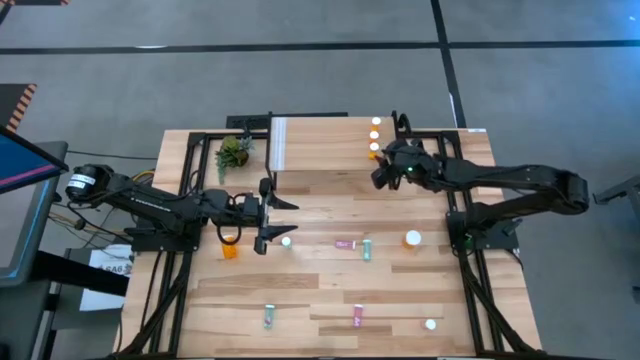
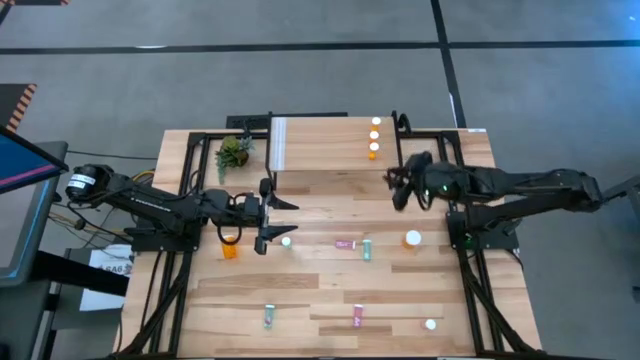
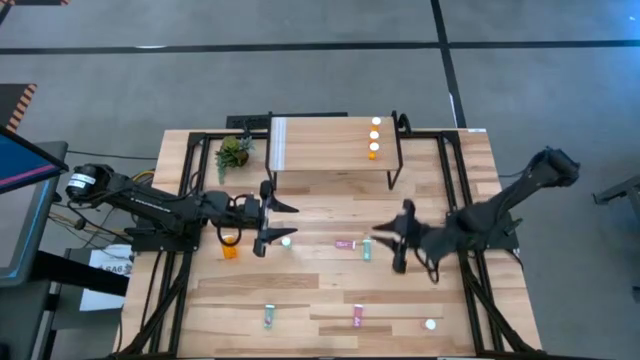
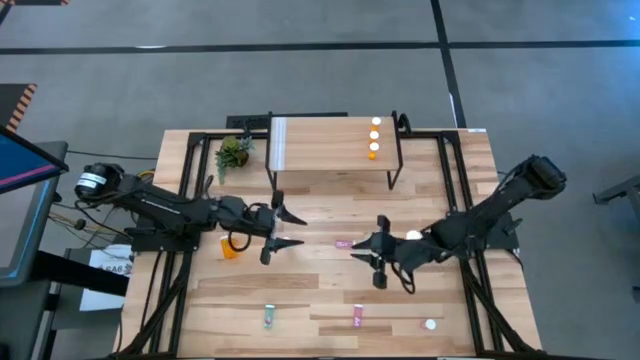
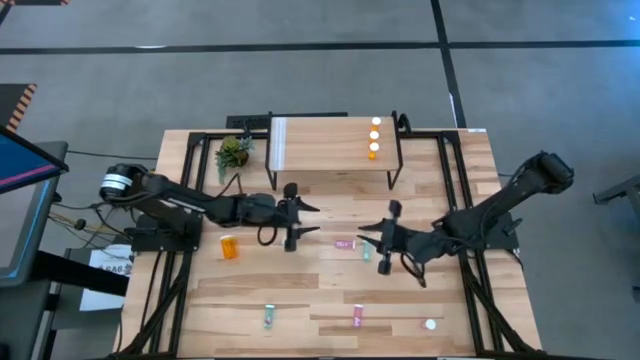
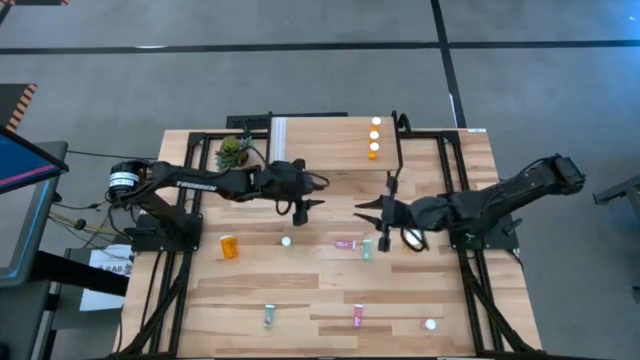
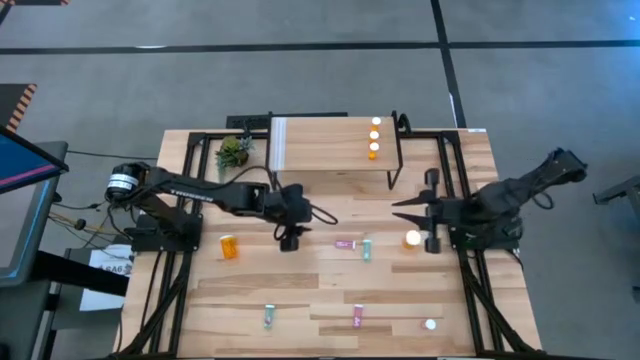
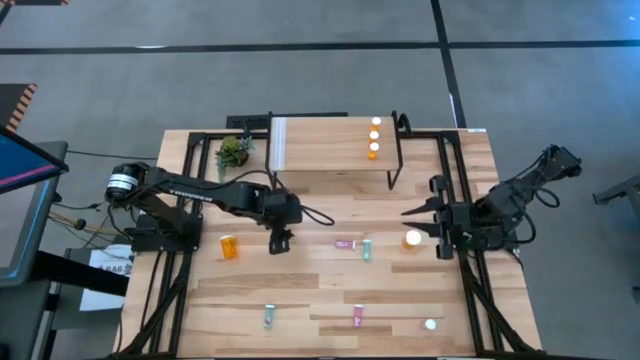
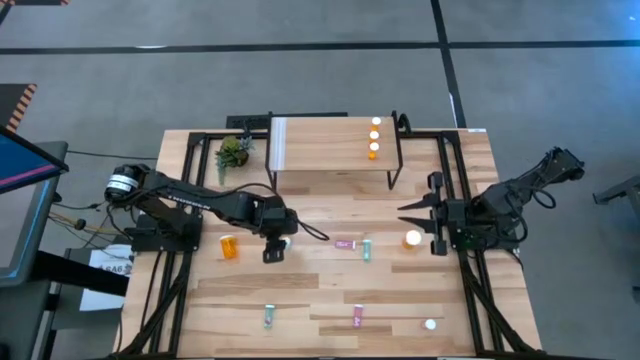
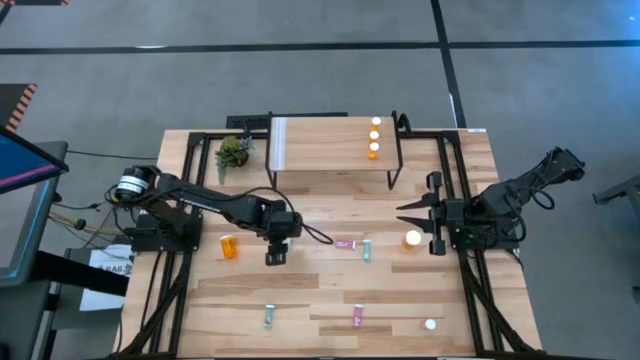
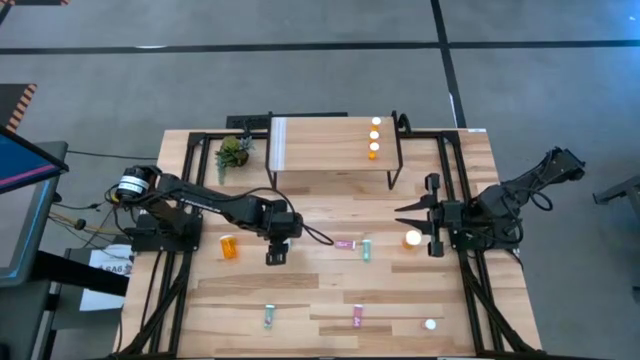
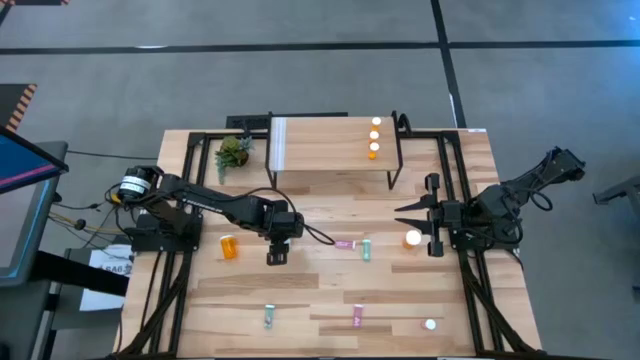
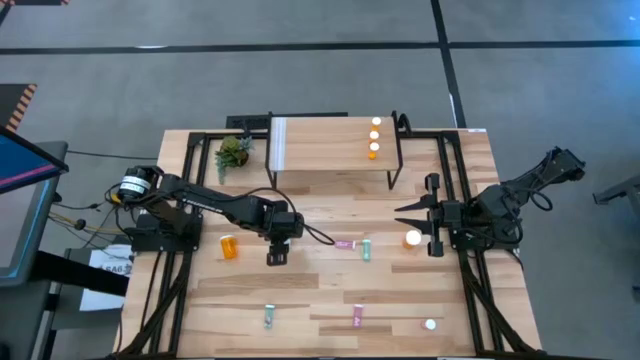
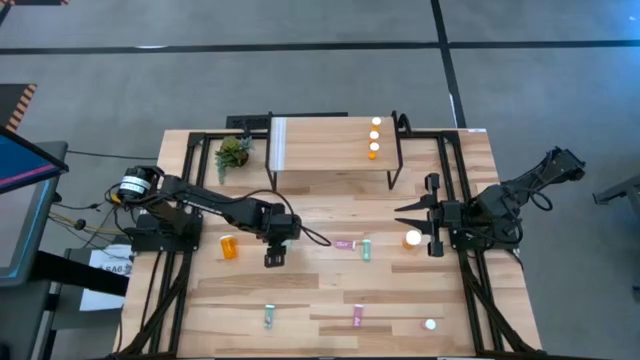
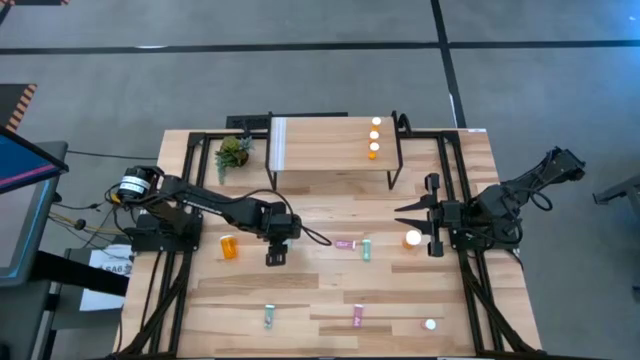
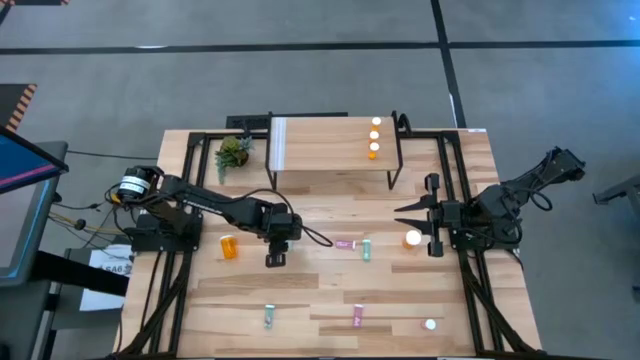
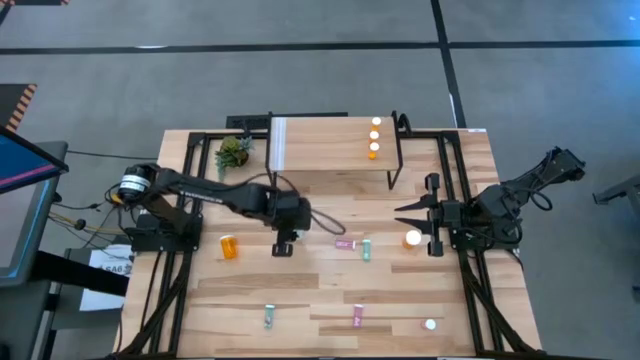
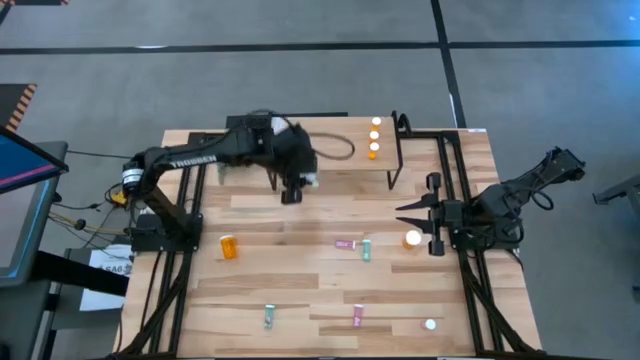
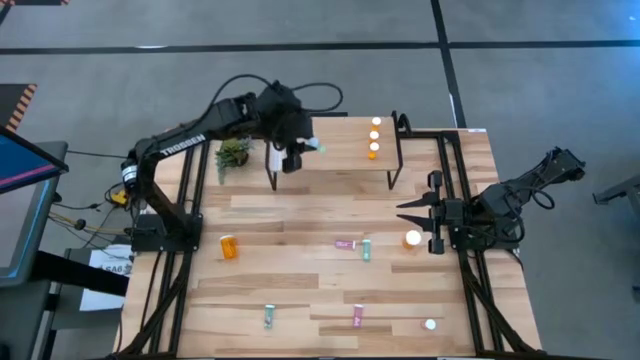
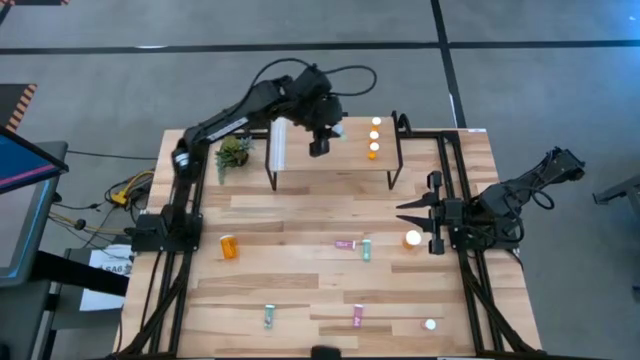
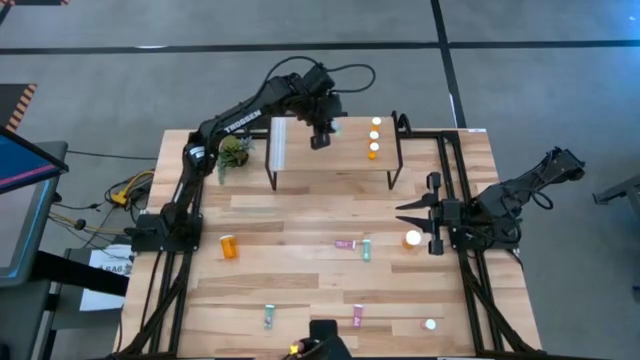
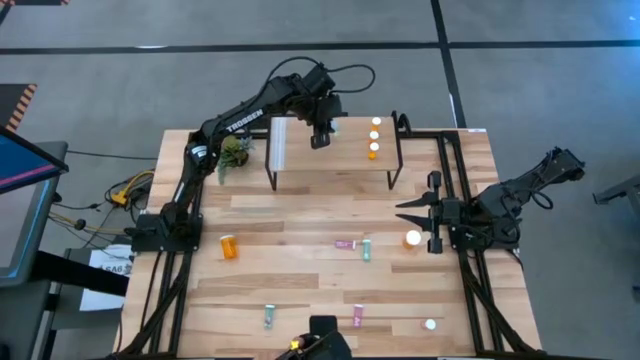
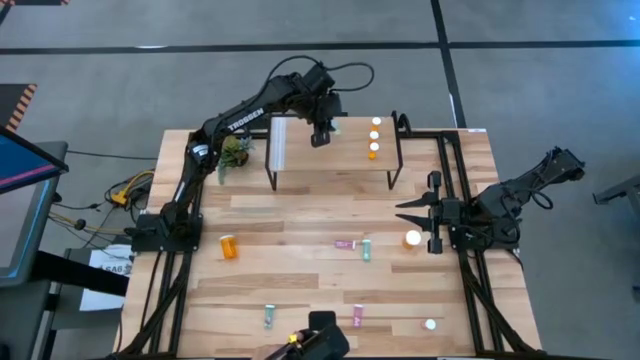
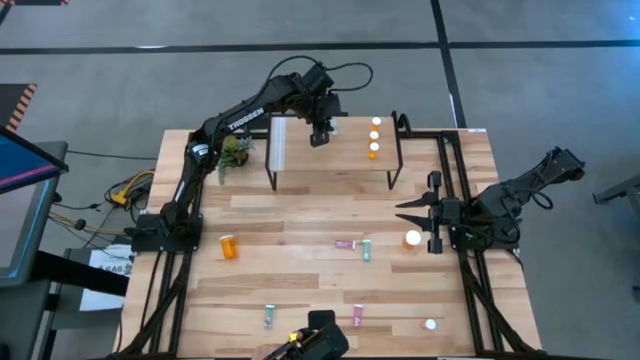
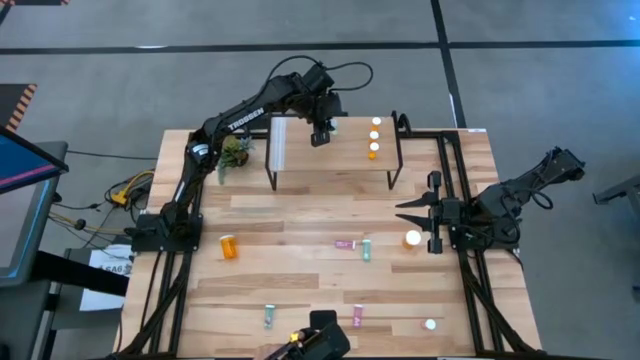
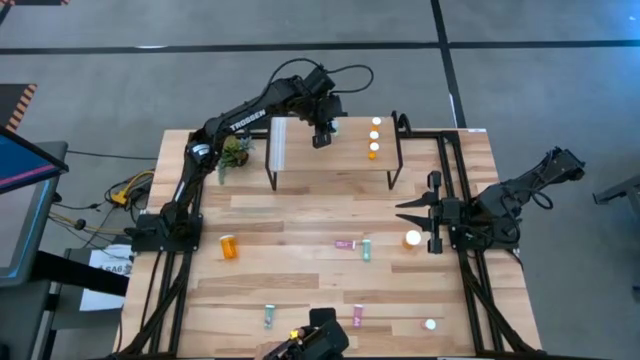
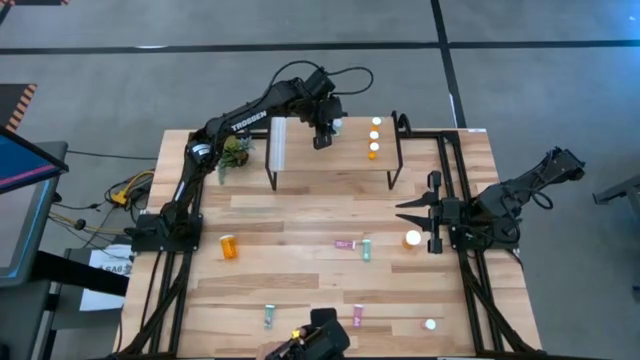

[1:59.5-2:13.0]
Task: Pick and place medicine bottles onto shelf by color
Put the top left blue pill bottle on the shelf

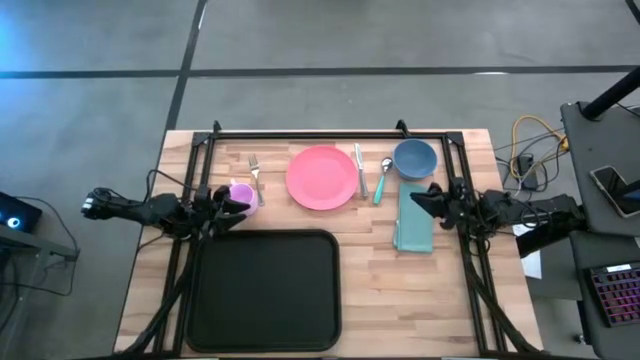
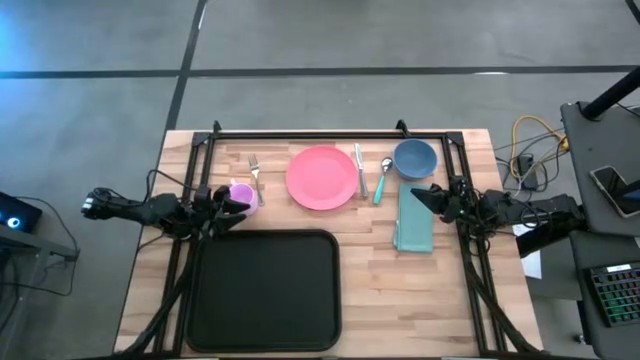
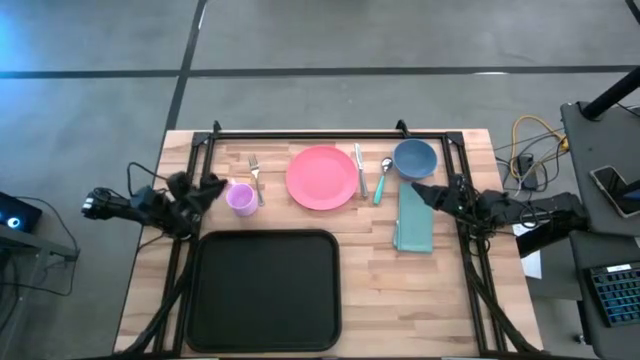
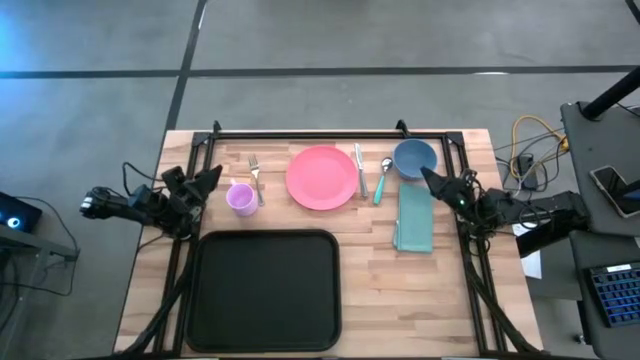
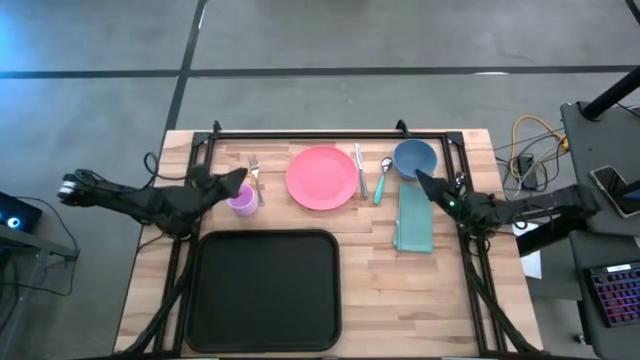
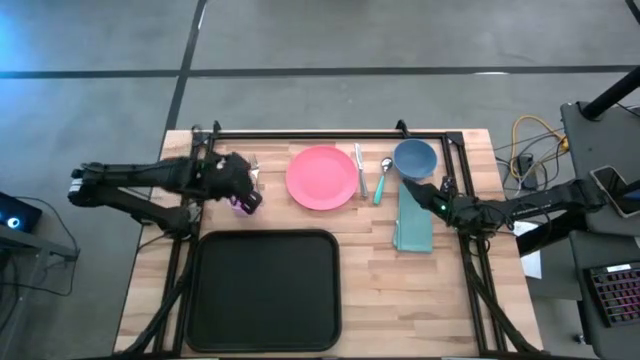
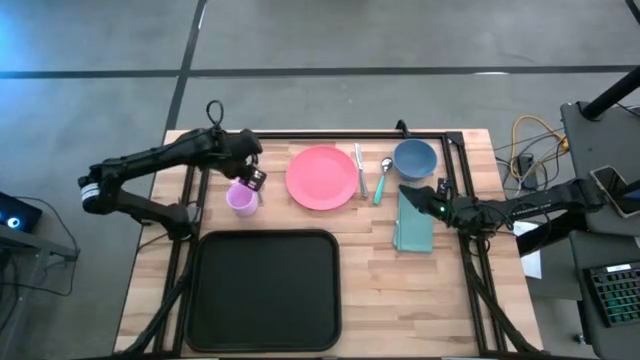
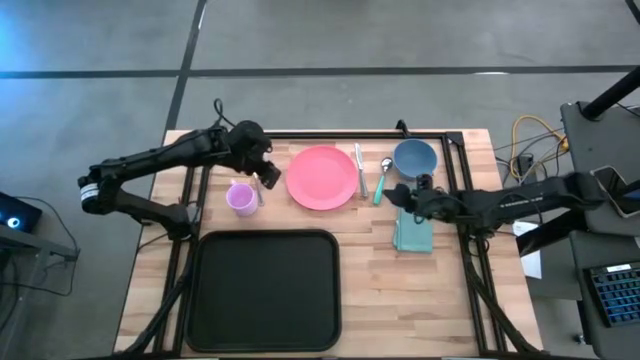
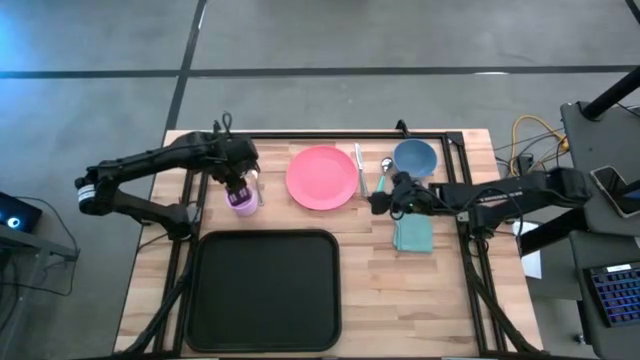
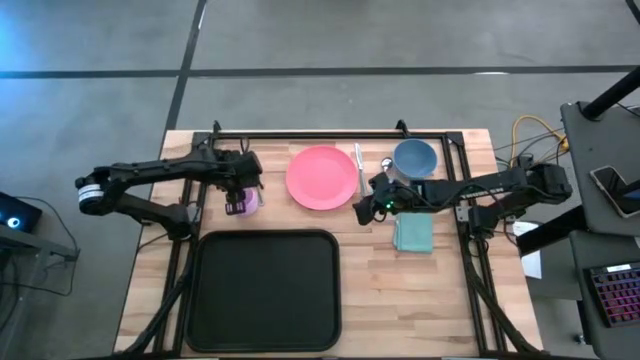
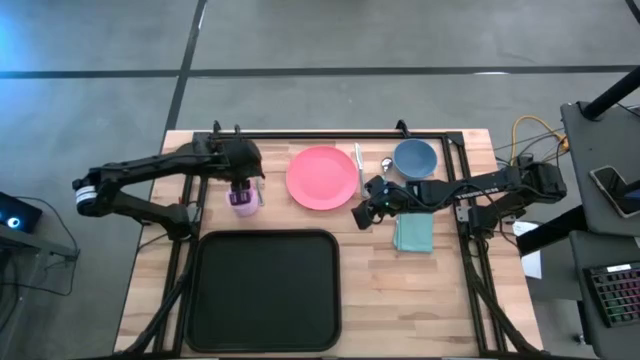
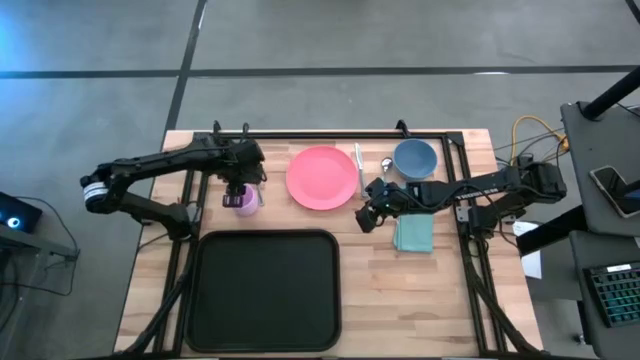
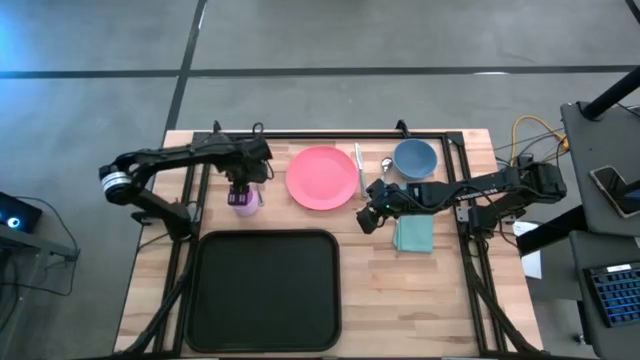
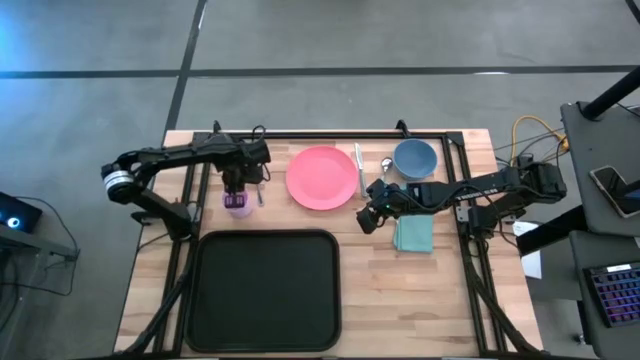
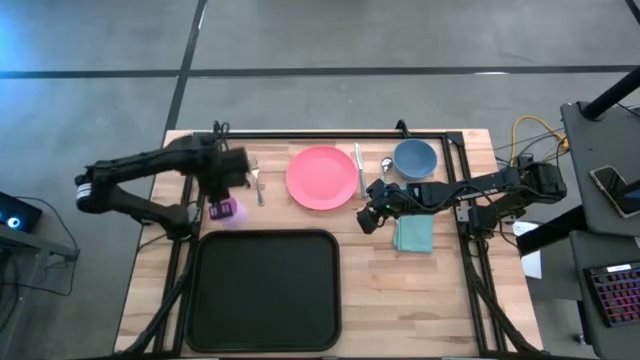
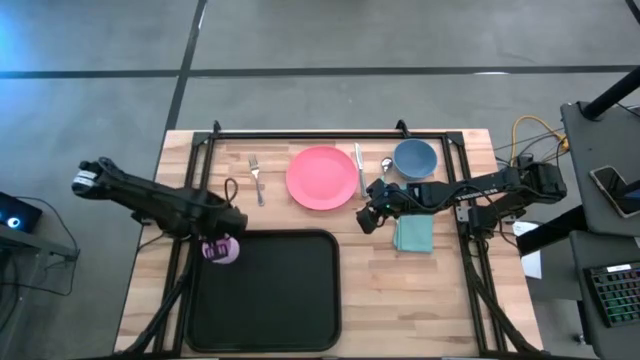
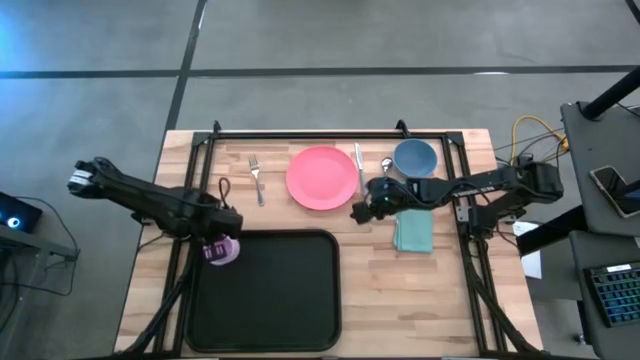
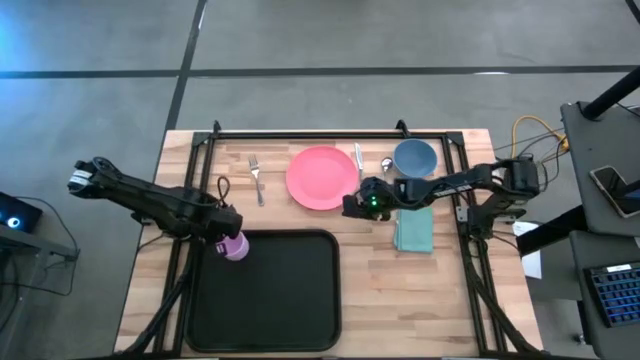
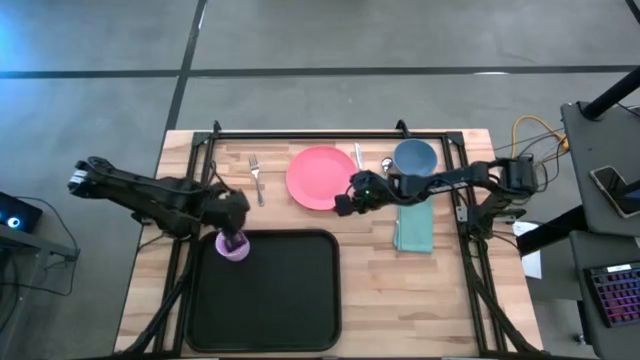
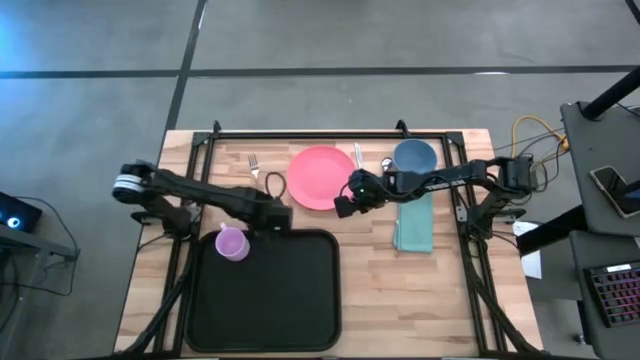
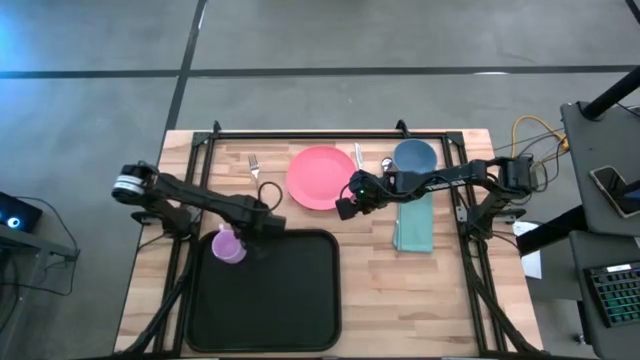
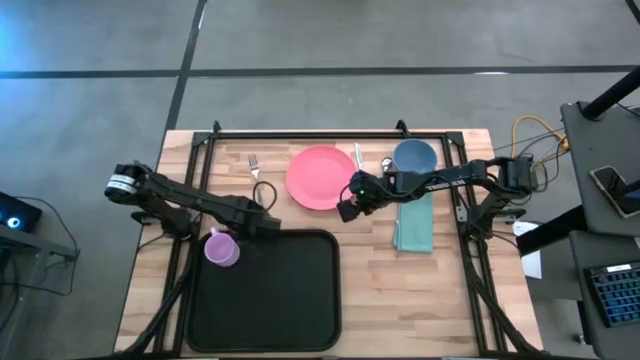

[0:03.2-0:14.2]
Task: Set up tray
Put the violet mug on the black tray in the top-left corner
